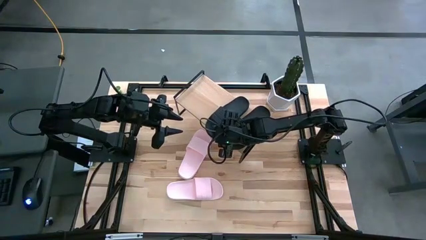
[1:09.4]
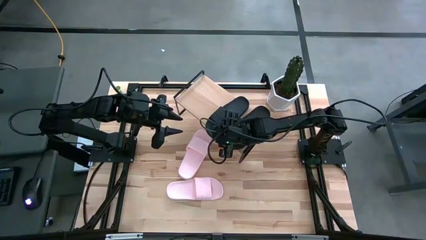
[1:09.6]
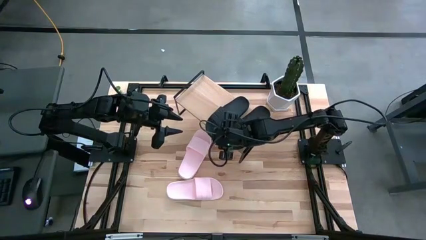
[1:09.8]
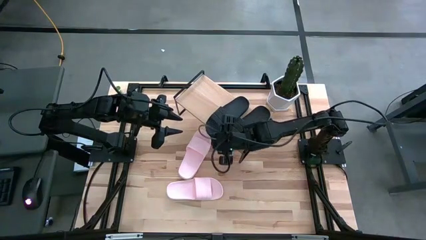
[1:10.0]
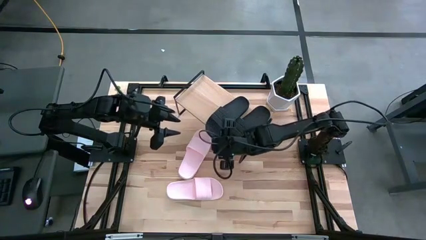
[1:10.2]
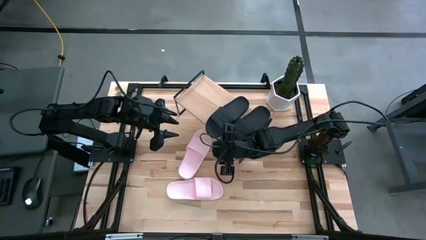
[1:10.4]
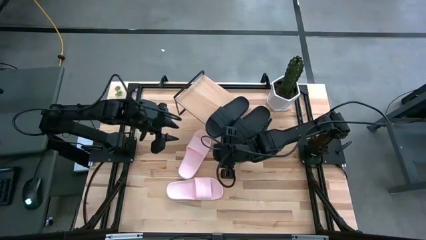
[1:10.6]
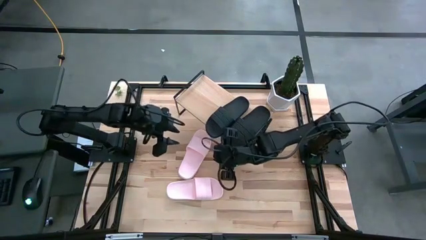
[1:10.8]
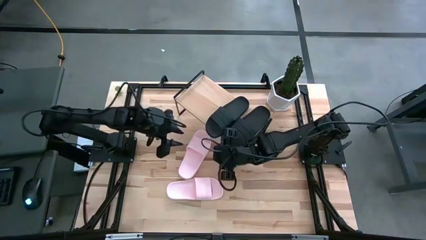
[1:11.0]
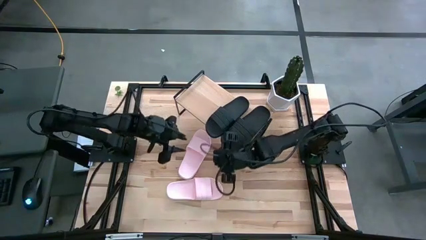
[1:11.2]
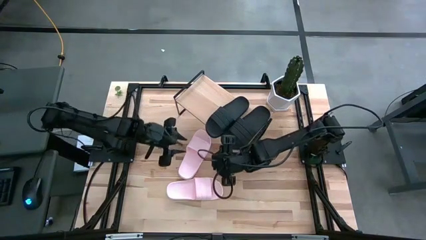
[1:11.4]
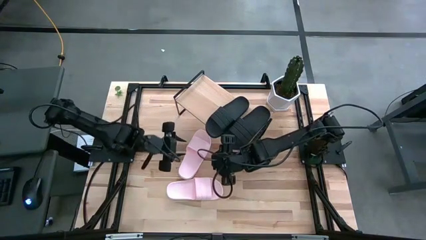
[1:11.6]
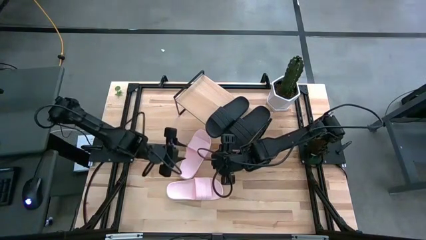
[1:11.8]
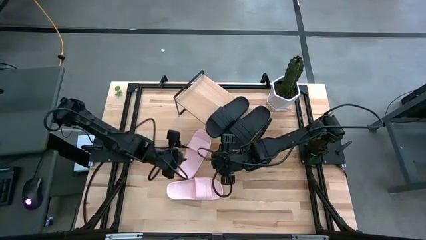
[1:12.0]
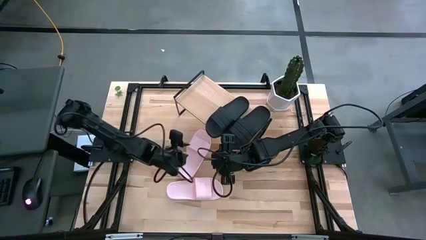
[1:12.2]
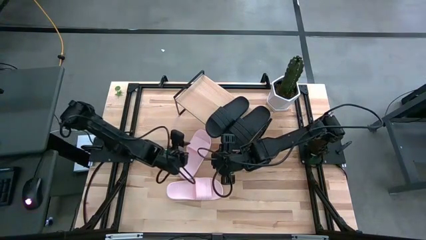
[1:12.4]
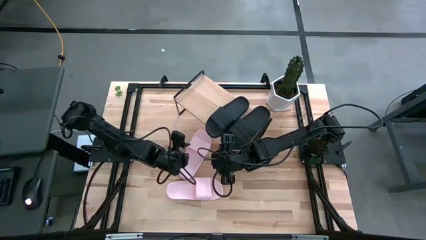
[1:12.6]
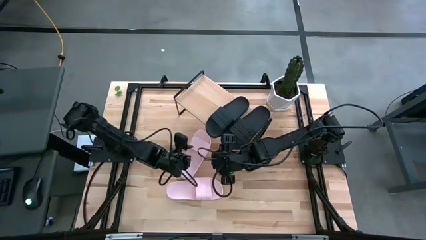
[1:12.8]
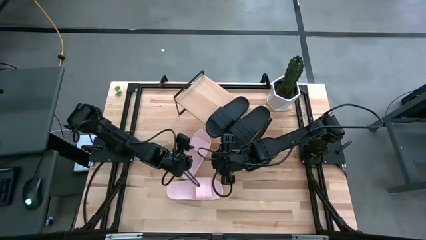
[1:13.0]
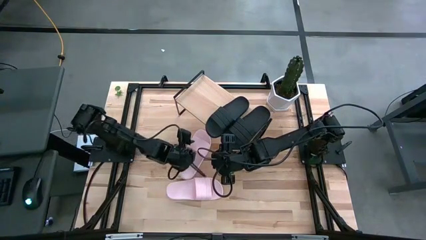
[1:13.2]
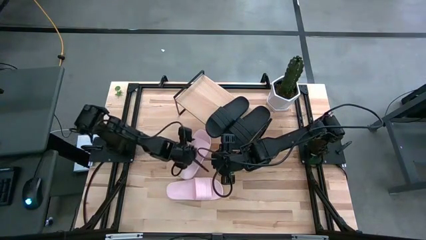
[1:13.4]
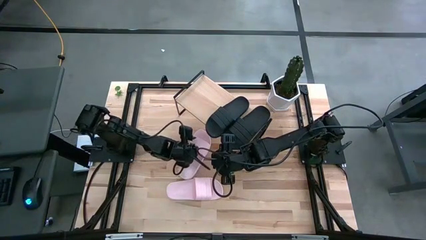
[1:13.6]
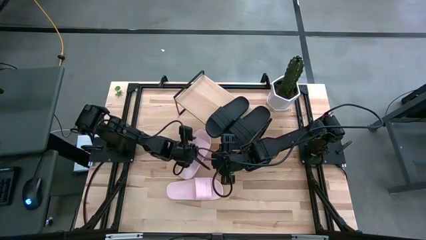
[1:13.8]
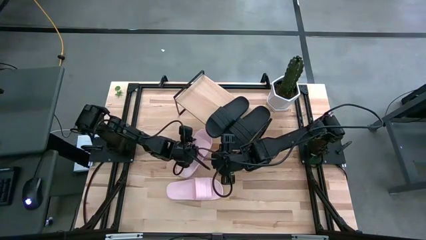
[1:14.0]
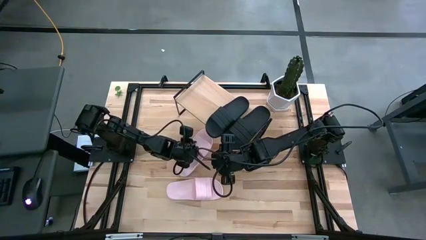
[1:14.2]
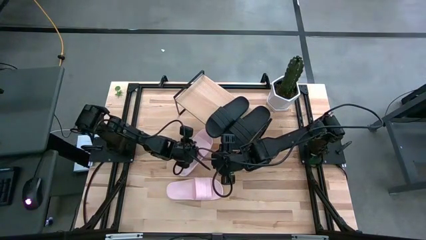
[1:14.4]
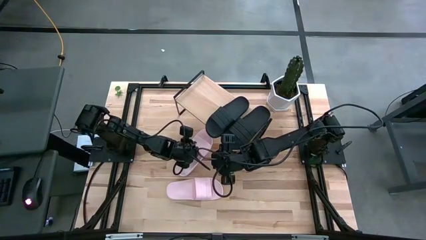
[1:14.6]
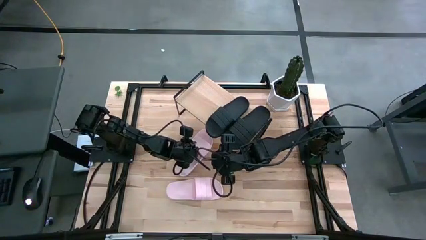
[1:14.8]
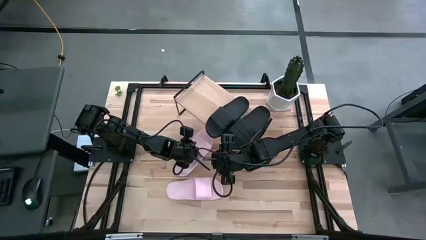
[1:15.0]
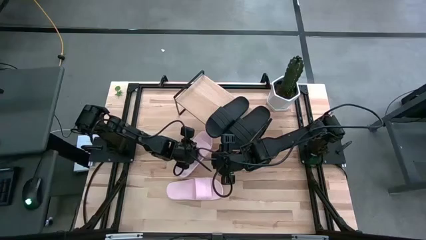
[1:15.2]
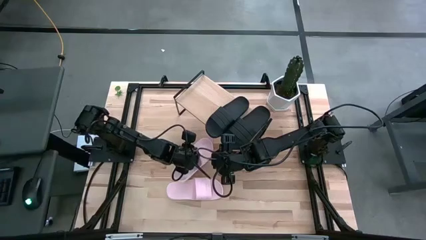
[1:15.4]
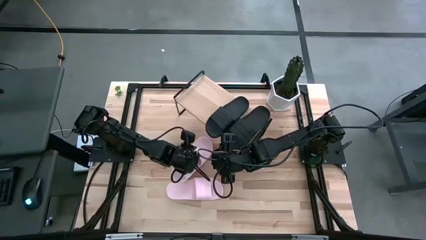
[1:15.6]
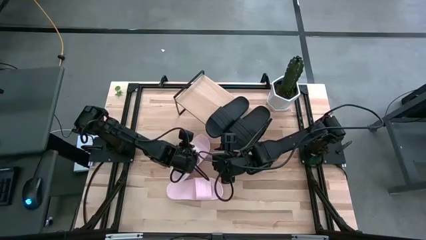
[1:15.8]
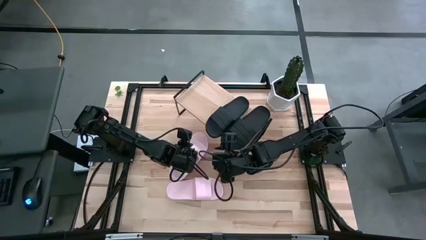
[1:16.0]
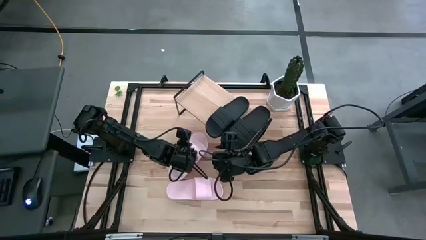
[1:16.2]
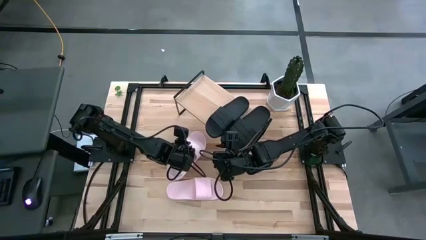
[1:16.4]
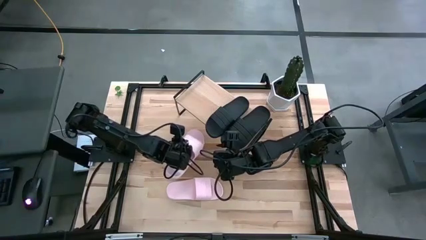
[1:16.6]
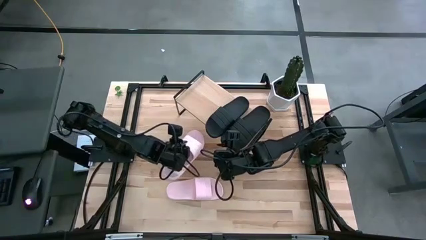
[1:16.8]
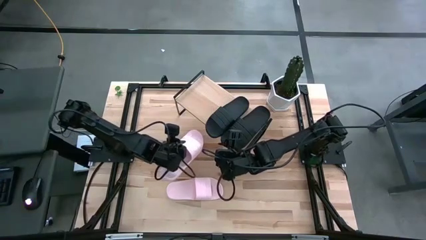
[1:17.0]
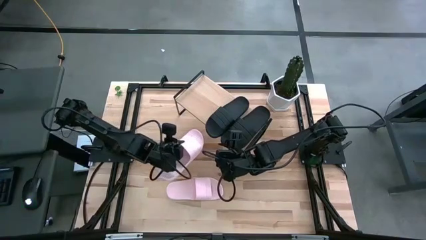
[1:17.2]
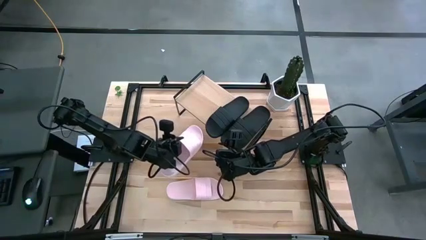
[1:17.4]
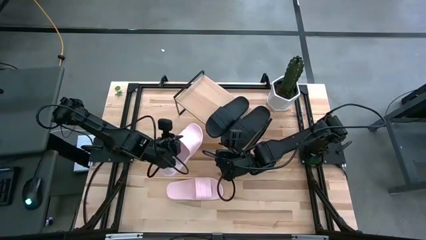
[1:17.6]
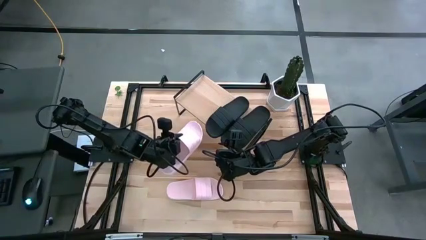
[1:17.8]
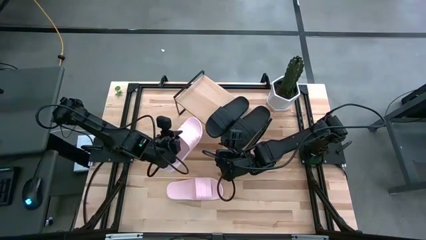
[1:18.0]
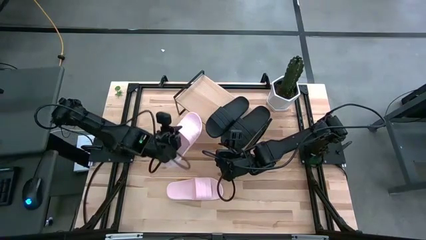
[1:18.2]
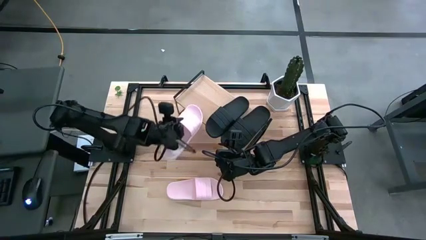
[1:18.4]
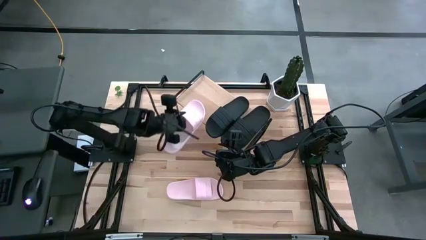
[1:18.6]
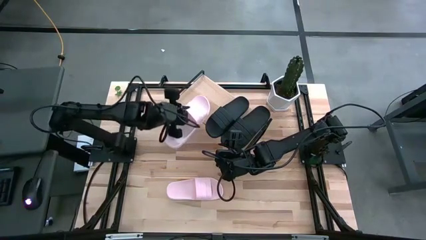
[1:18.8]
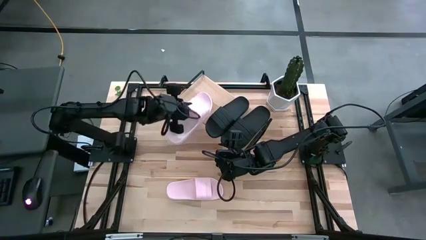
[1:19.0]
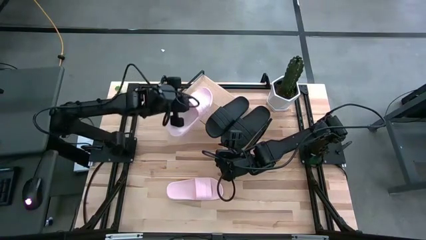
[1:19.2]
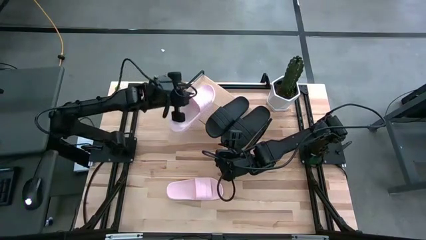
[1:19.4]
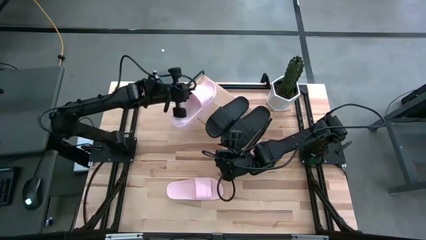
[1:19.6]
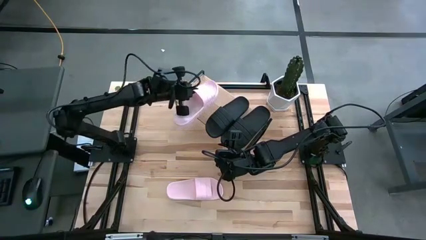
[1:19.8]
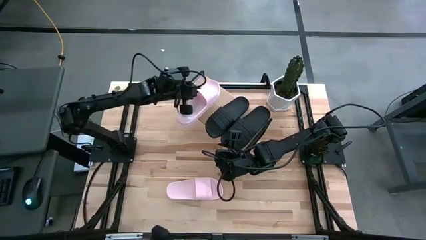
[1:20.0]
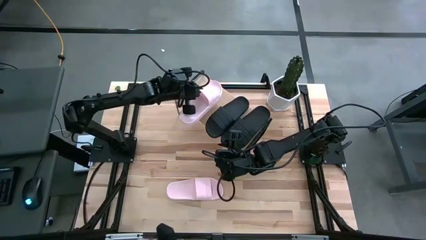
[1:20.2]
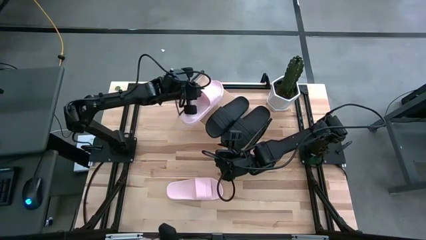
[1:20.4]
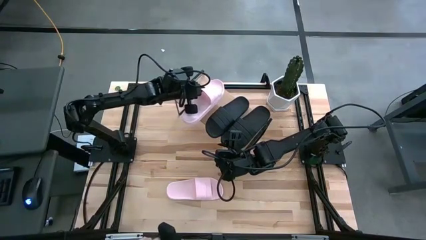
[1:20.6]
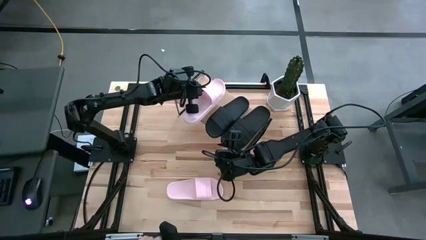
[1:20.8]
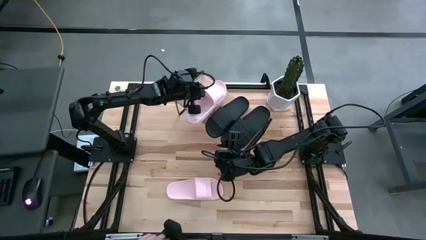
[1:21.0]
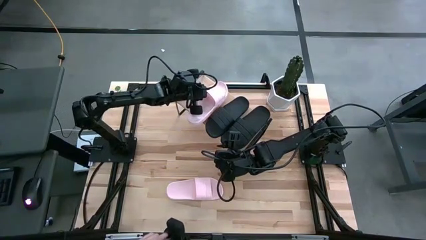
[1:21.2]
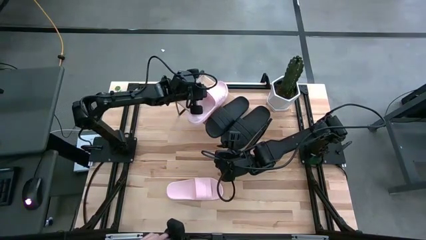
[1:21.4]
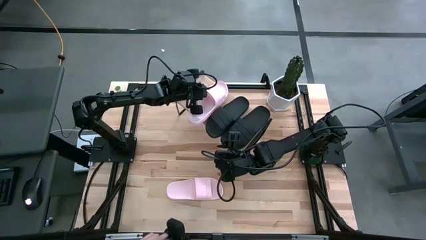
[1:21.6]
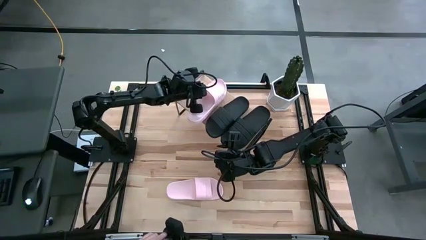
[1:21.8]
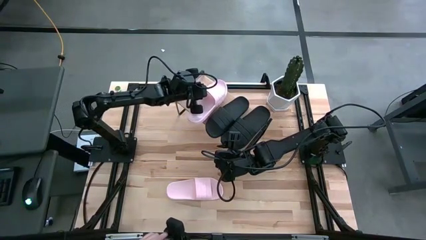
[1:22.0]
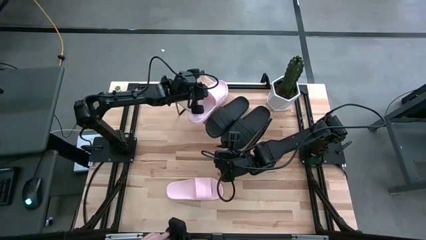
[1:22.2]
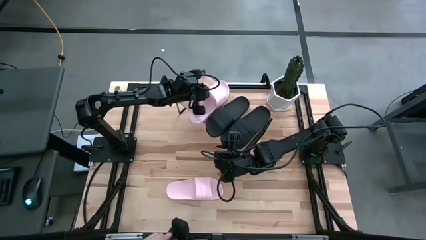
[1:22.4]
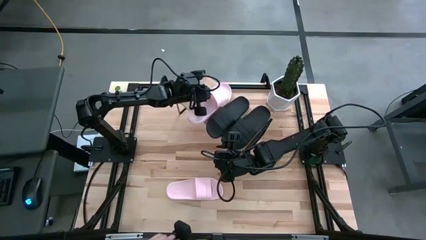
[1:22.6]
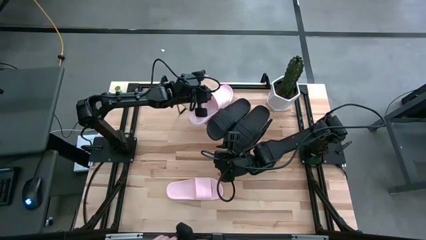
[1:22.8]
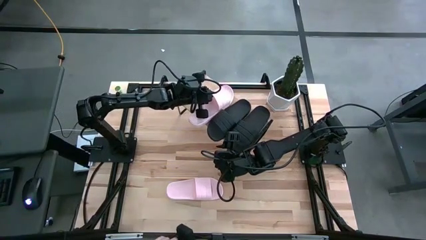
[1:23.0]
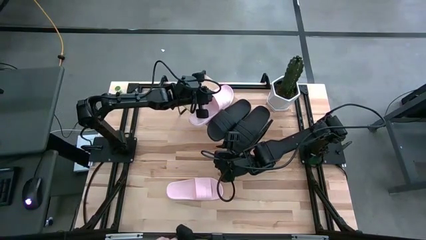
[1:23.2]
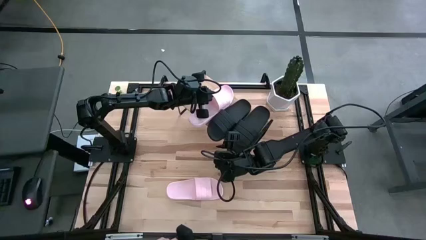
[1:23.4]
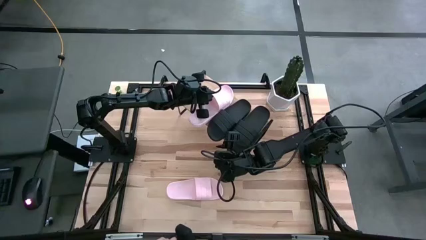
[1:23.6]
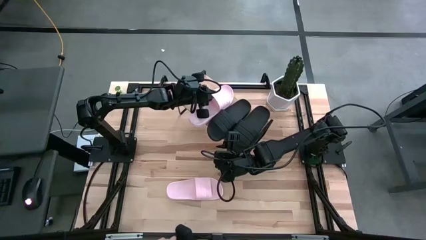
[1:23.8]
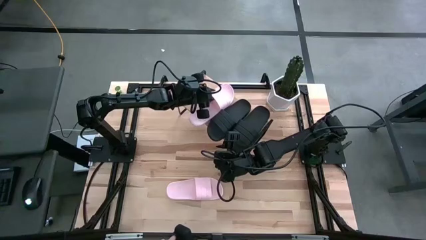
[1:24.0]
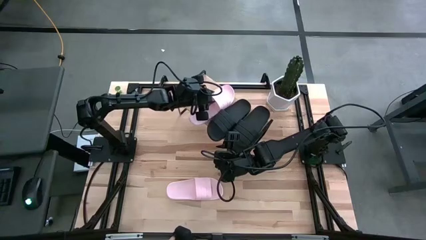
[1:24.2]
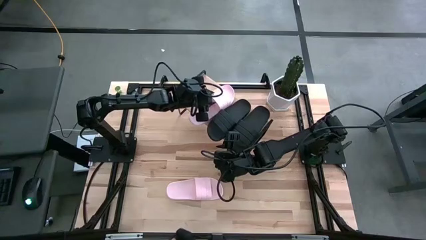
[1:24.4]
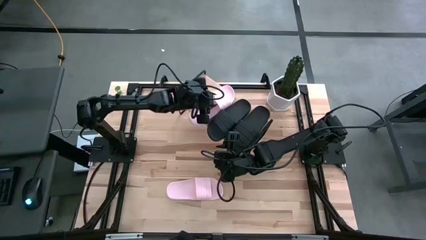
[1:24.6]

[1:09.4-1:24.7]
Task: Pick and place slides into the shelf
Put the top pink slipper on the shelf

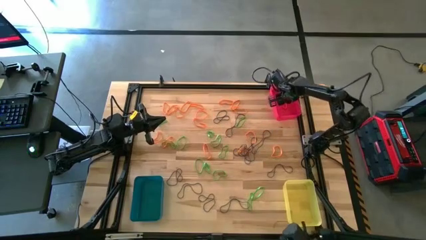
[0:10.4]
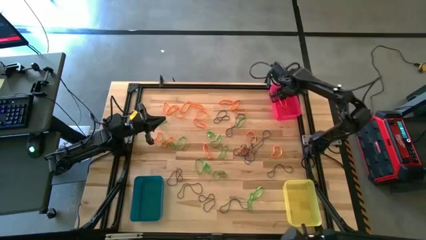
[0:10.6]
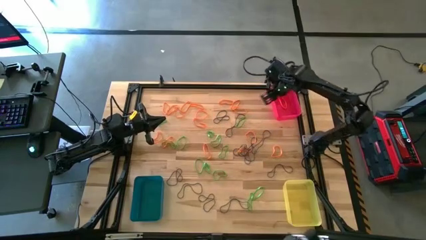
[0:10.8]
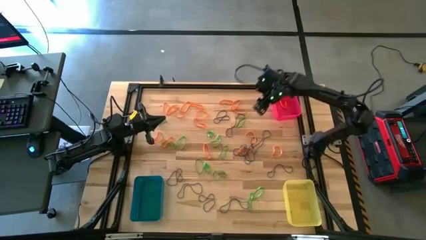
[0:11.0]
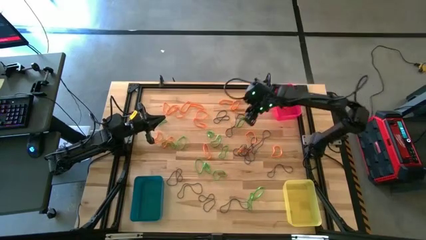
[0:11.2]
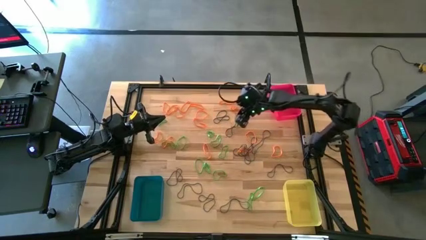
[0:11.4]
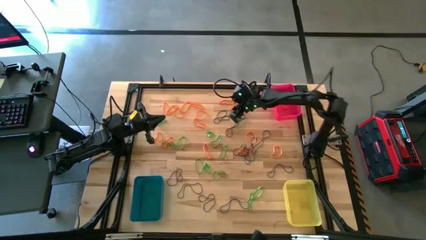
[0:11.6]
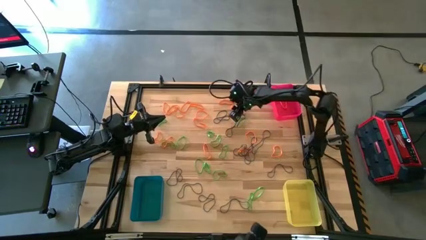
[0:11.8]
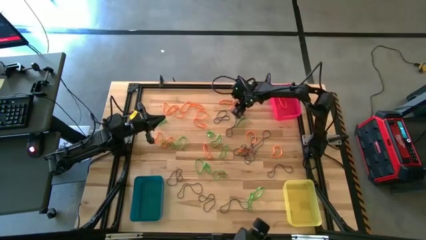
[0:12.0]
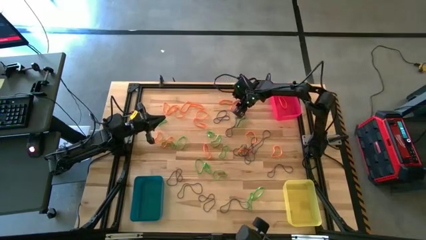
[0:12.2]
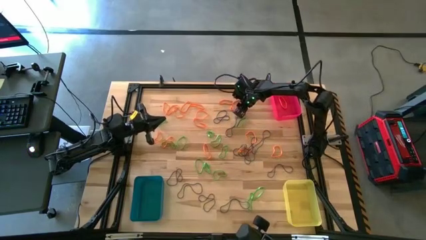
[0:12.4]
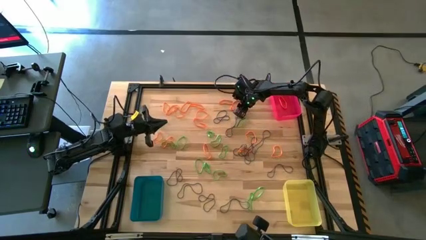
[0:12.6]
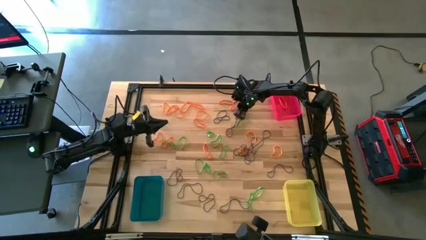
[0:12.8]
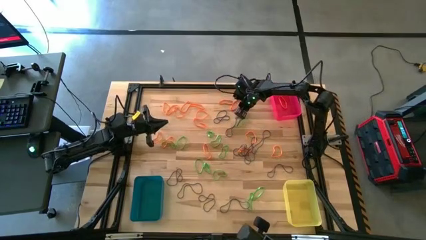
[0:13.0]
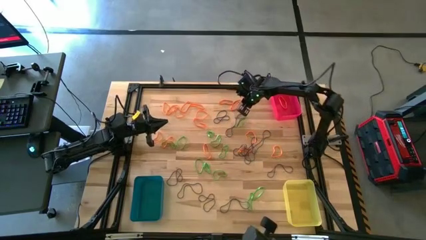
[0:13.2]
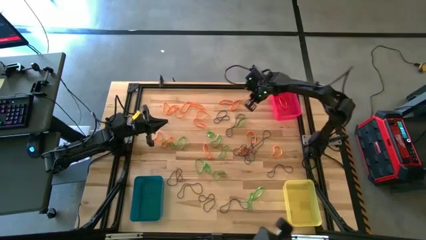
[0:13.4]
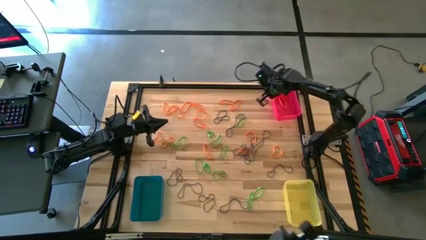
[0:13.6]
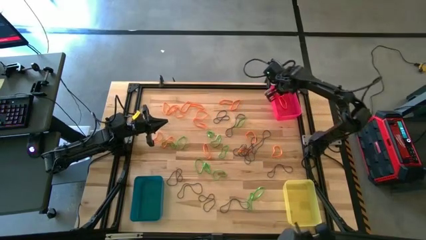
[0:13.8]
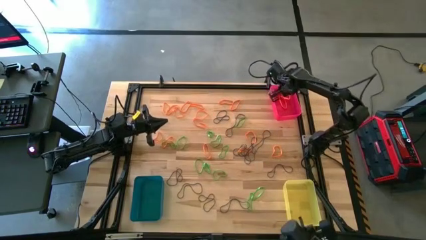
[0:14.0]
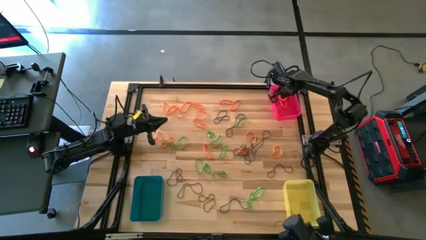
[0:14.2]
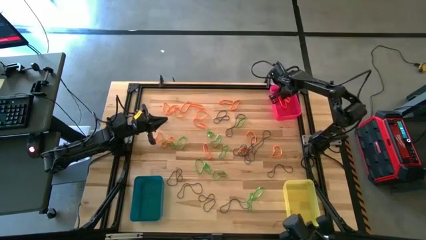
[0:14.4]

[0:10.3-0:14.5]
Task: Sort rubber bands into baskets
Put the orange rubber band into the red bin
